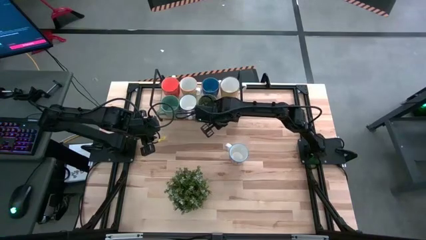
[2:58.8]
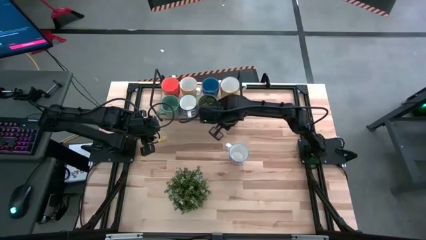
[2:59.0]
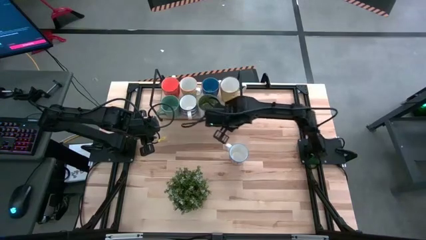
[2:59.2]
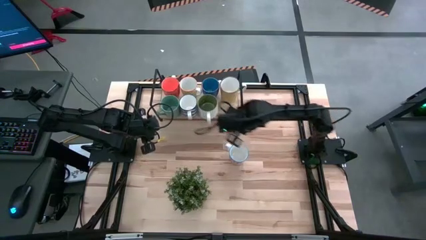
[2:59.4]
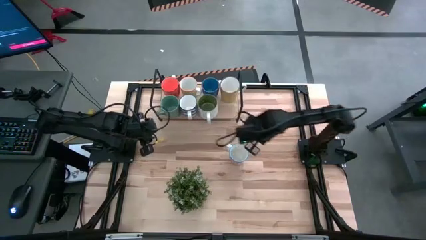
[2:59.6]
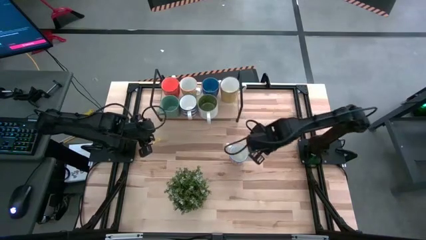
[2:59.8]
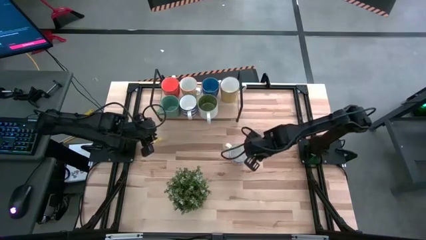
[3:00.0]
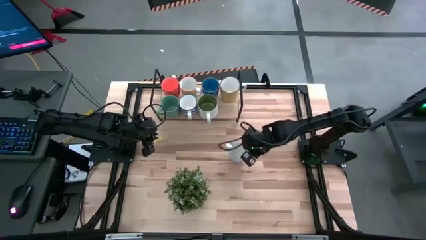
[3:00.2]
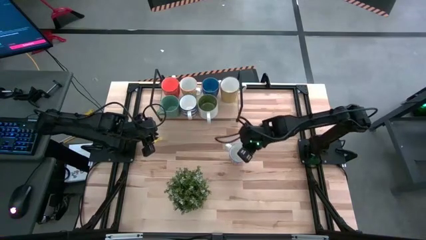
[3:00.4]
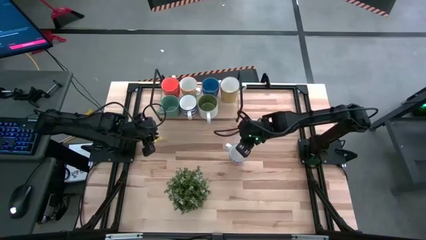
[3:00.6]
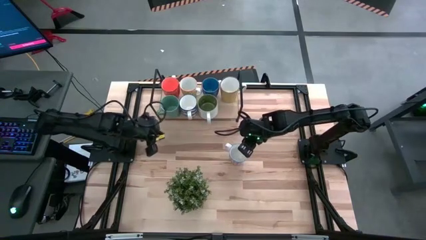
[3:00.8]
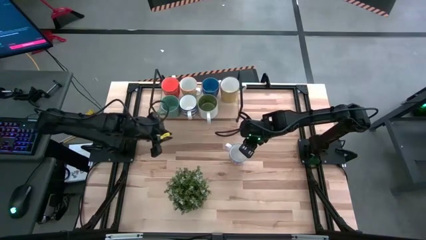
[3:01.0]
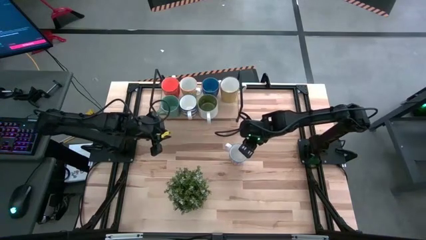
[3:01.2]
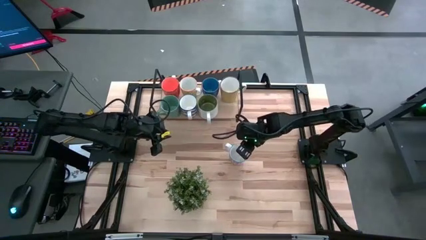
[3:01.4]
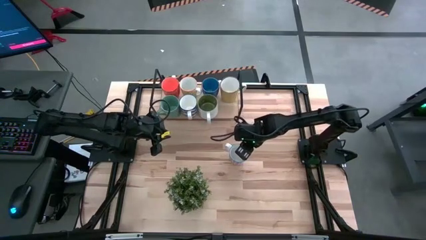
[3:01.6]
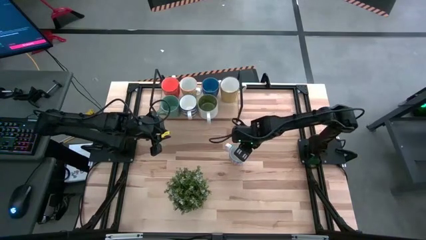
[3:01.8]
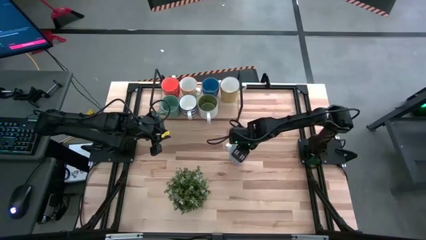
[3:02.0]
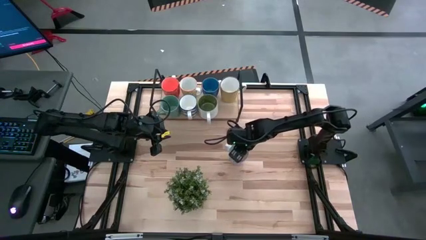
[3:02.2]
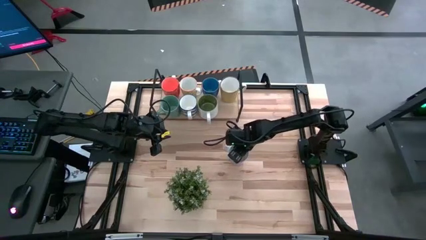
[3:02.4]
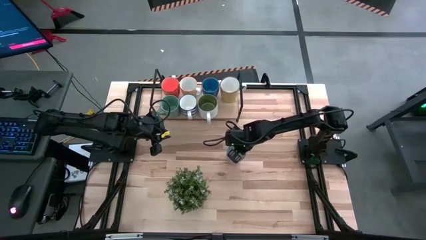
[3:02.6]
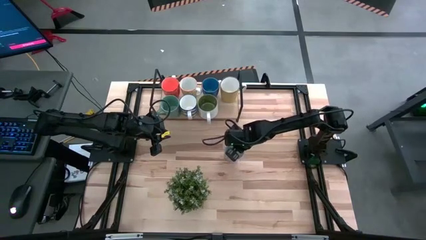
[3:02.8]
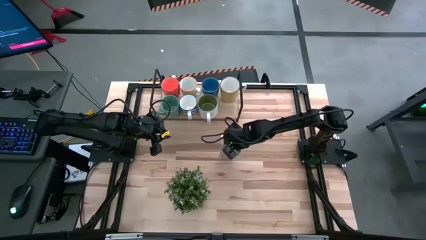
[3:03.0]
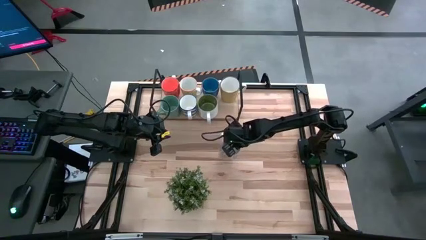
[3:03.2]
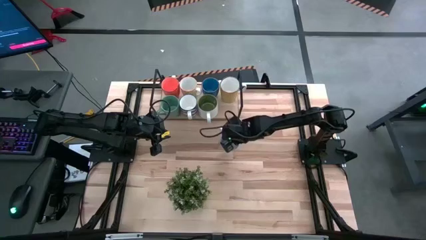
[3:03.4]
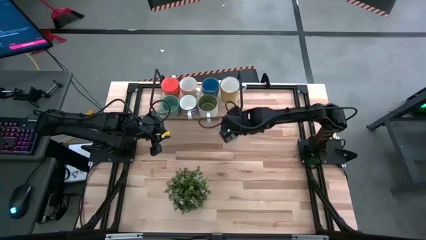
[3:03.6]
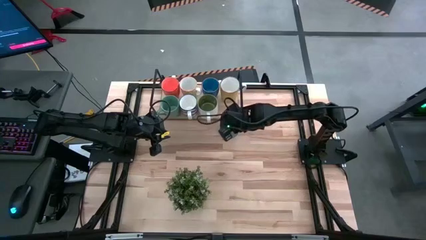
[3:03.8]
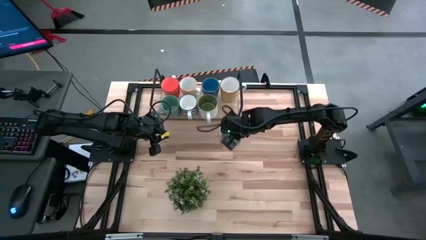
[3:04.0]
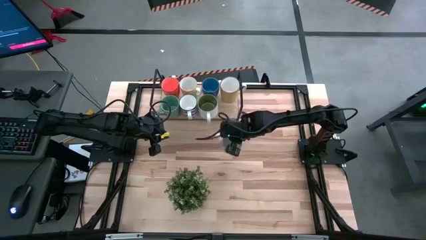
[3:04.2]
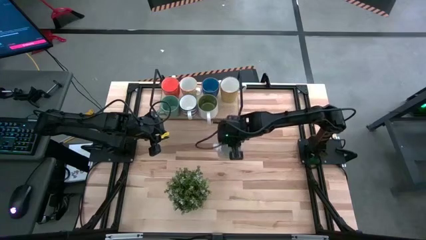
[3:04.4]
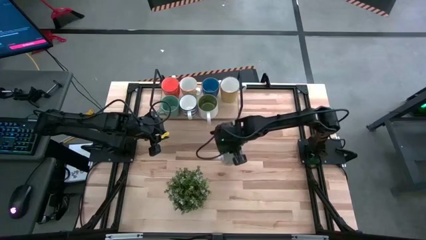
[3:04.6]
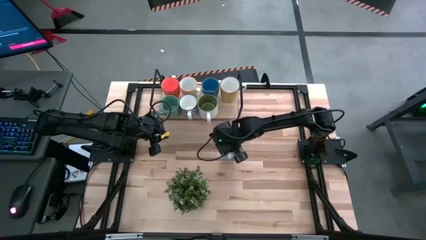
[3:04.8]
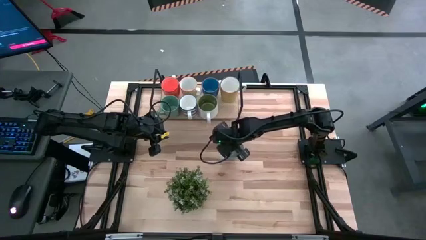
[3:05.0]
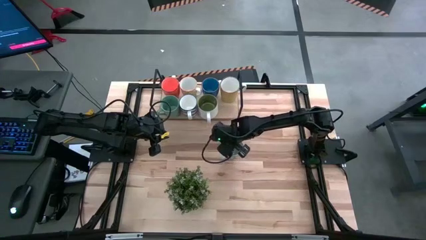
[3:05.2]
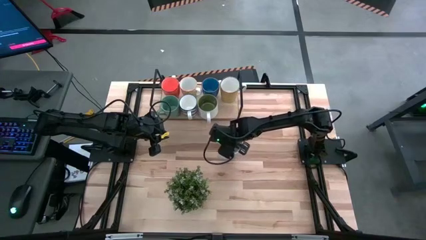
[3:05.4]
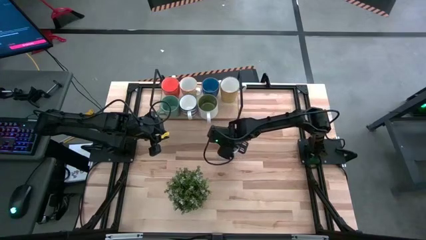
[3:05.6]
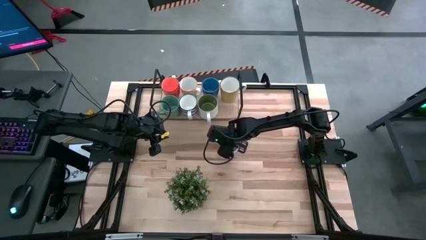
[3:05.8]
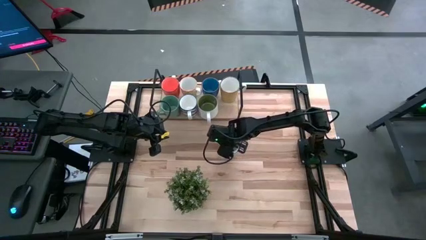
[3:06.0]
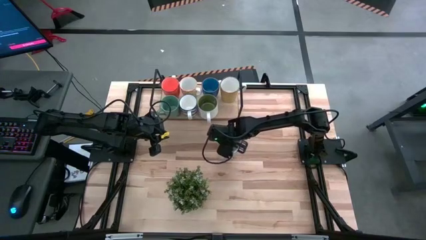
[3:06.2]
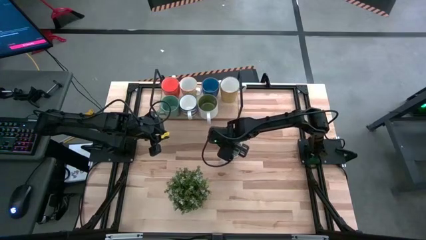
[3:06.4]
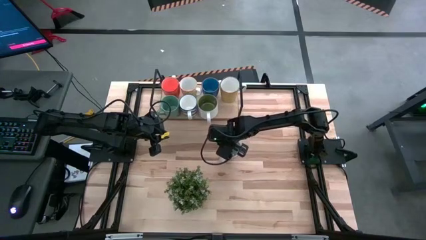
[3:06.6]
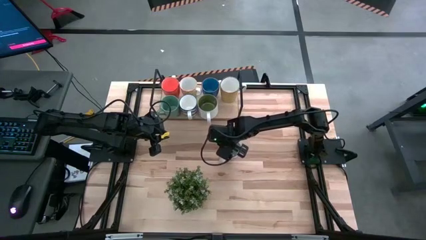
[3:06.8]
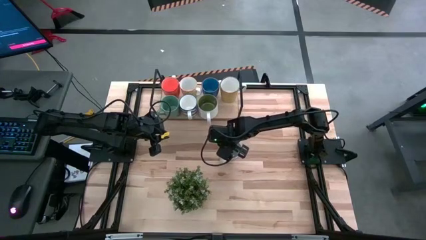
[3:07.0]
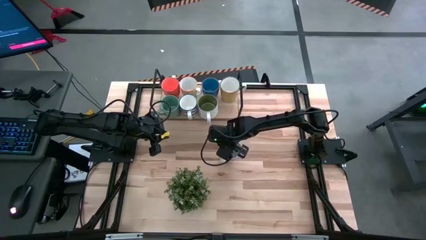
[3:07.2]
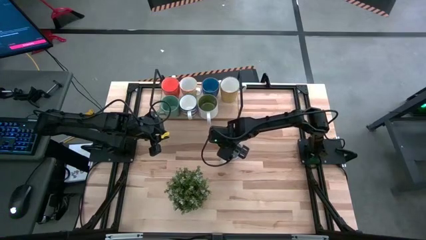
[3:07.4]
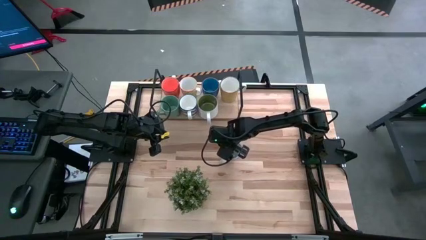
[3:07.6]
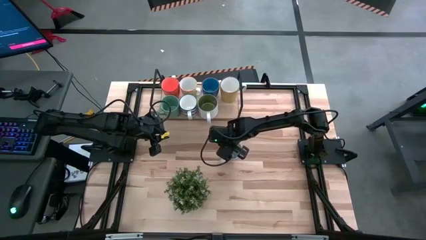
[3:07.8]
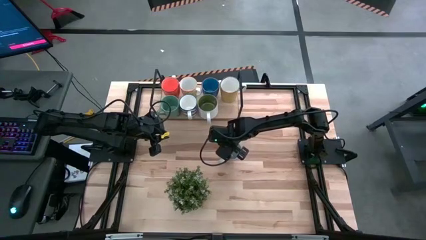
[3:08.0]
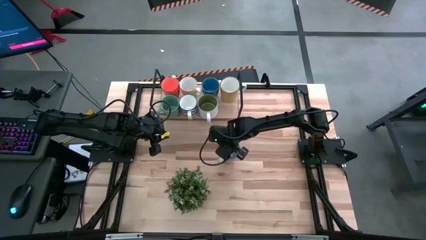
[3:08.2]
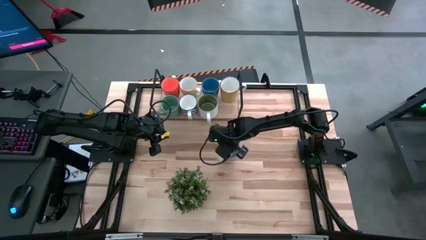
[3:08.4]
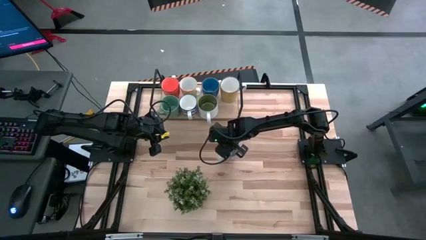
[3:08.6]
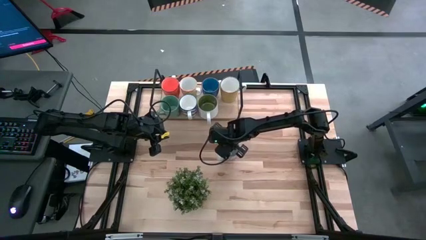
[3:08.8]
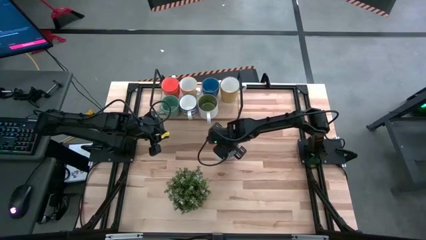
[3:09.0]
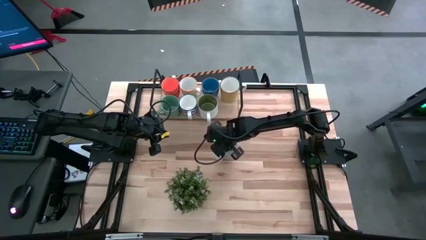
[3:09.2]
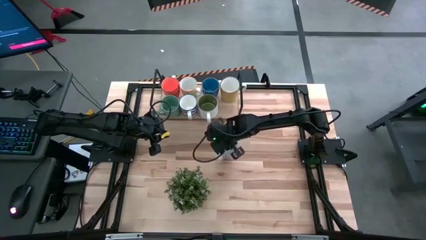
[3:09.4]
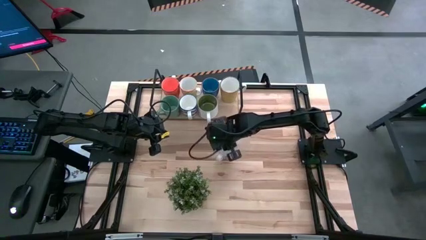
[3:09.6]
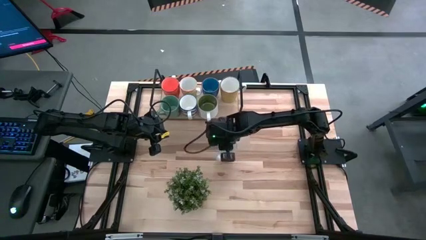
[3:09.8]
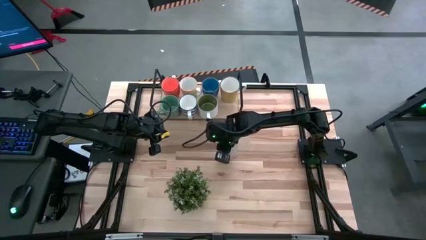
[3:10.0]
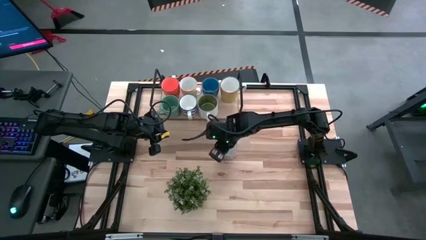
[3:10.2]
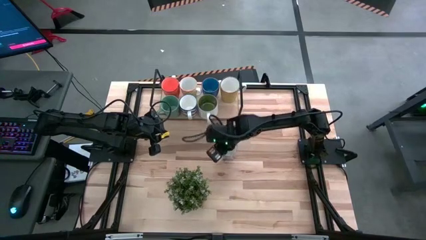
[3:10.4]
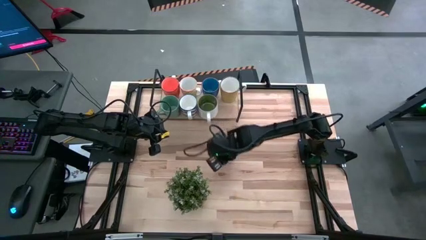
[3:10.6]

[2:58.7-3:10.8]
Task: Place coffee mugs
Put the red patterned mug on the shelf
